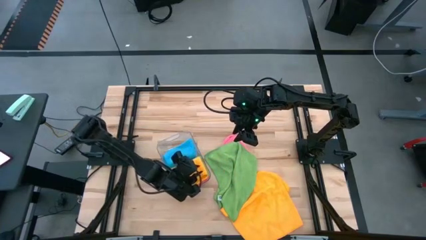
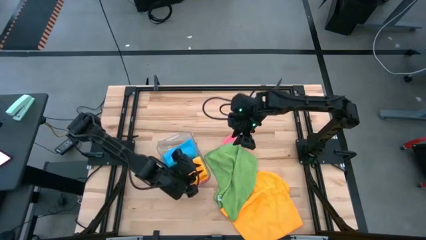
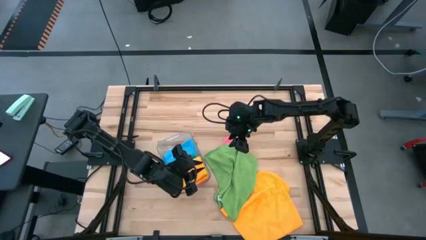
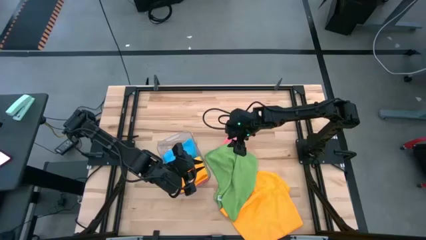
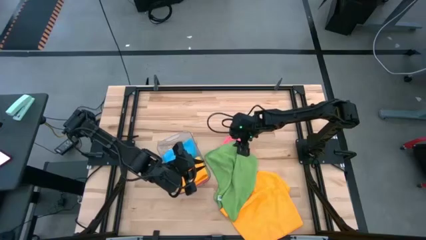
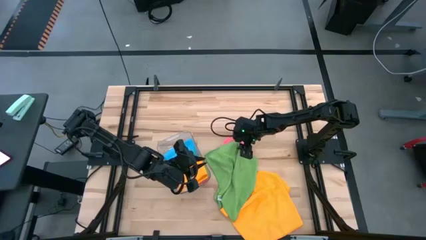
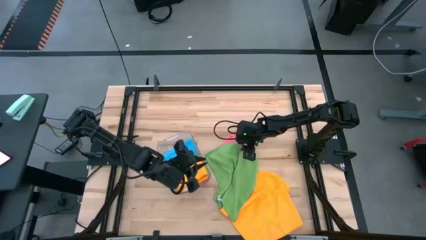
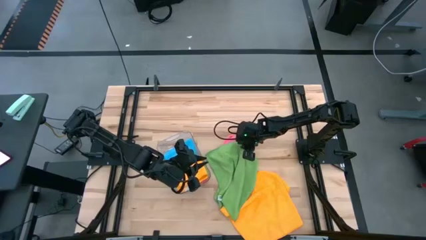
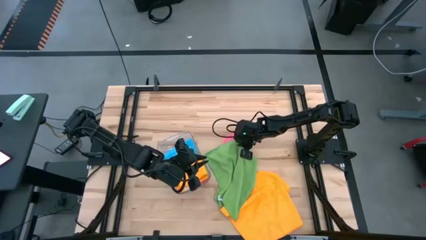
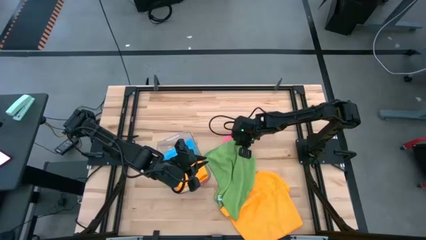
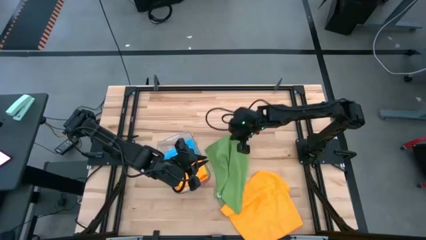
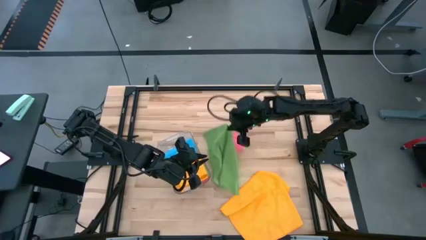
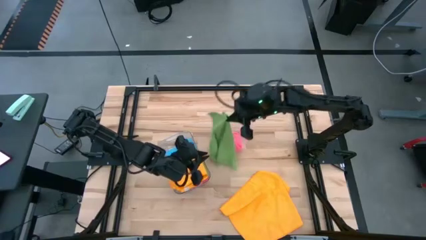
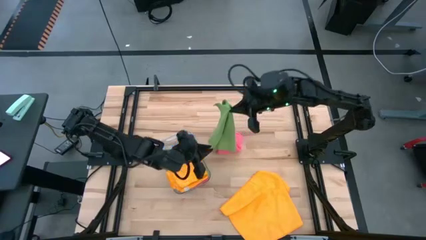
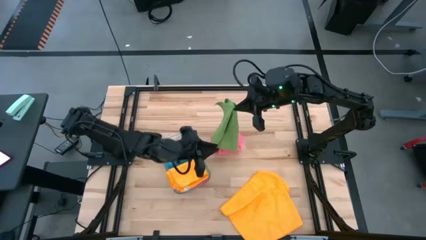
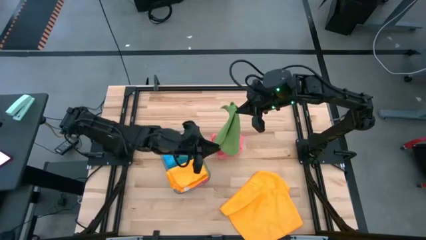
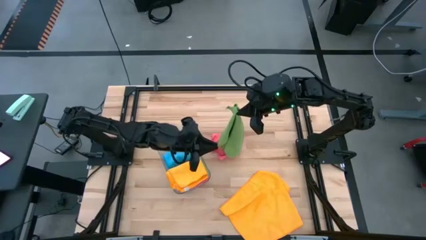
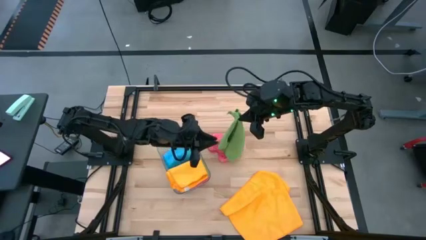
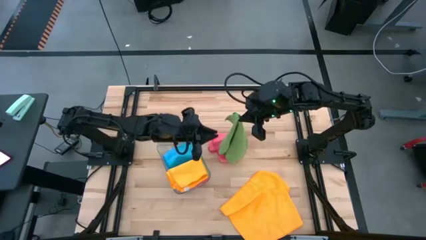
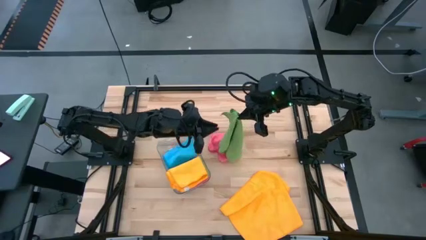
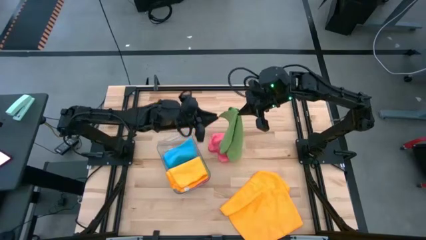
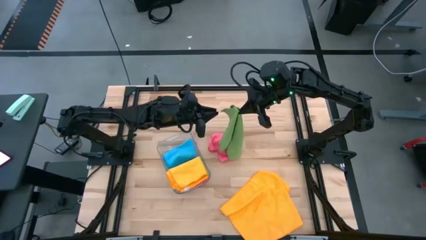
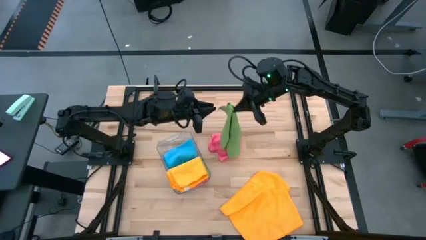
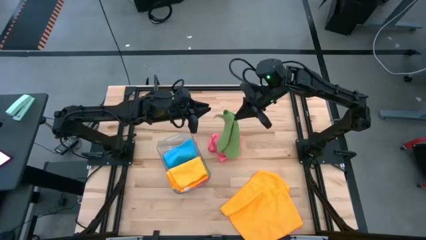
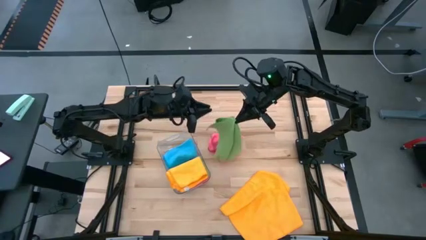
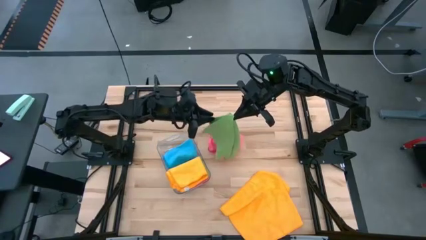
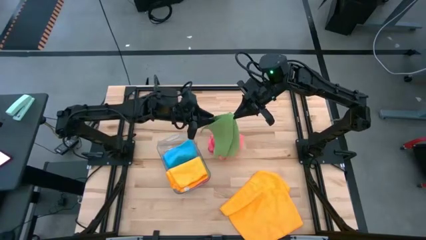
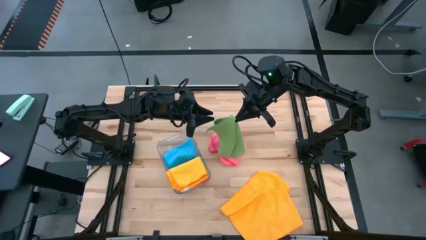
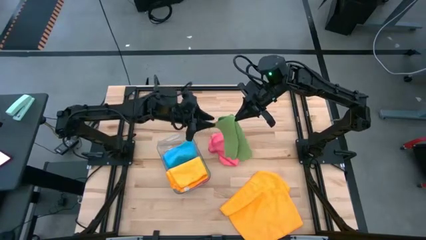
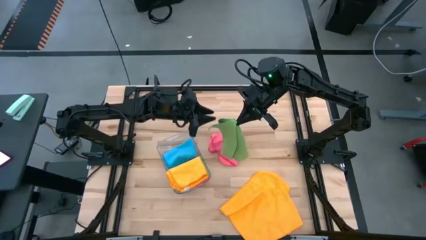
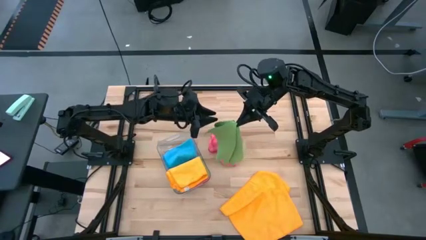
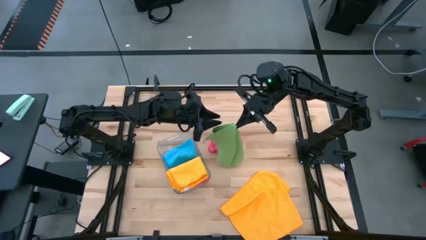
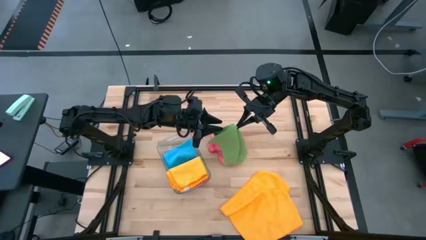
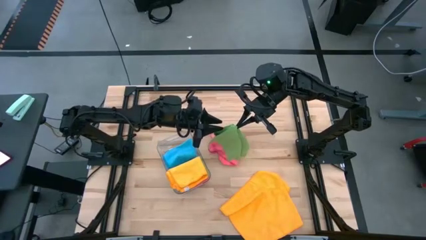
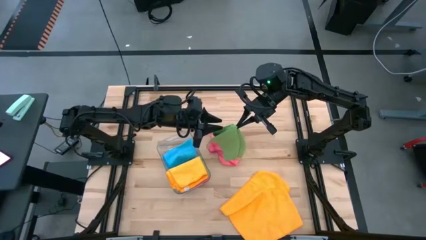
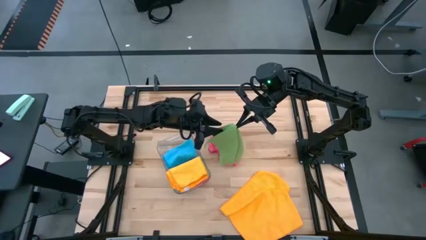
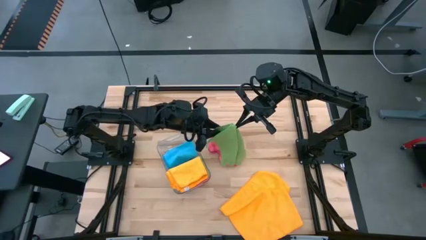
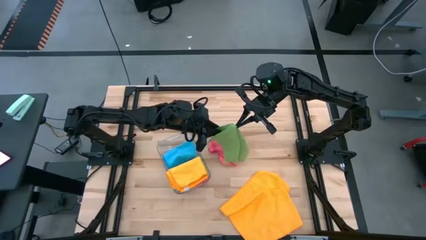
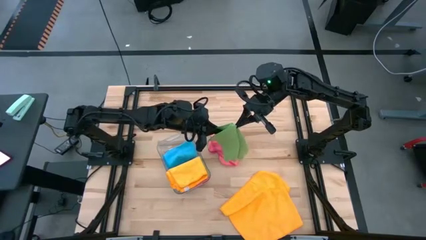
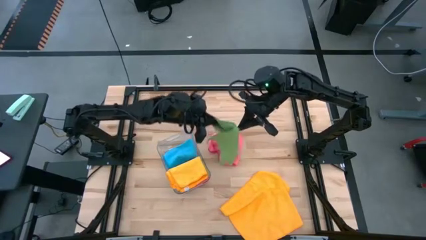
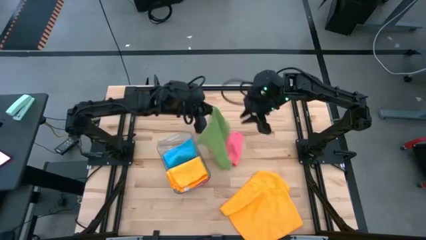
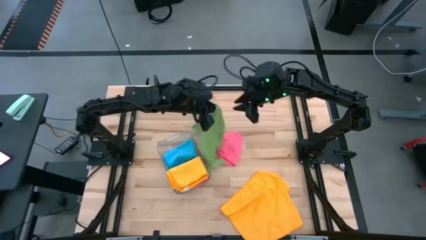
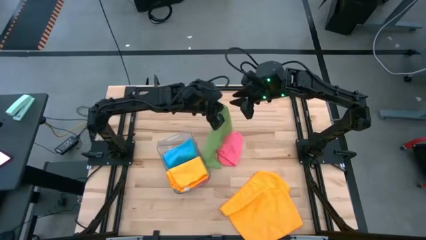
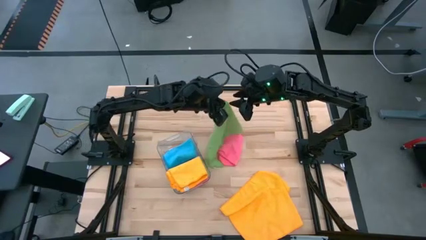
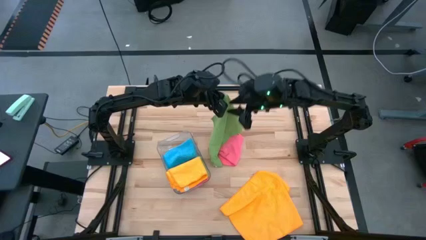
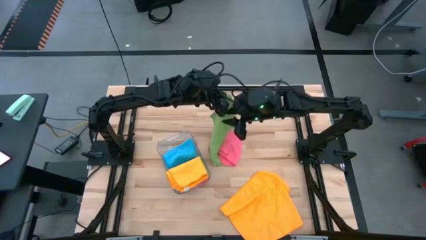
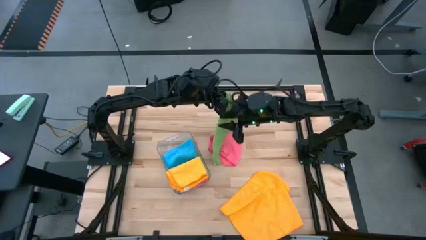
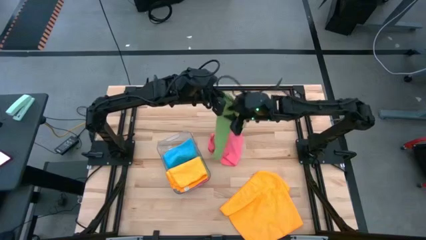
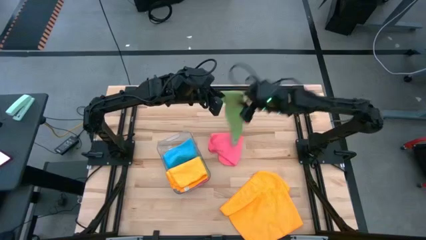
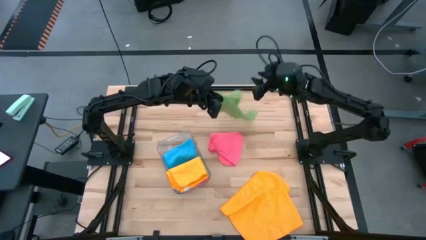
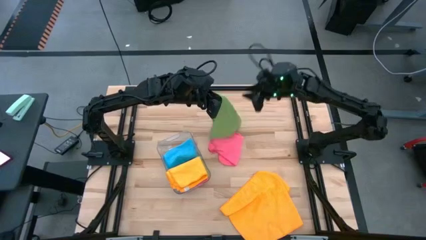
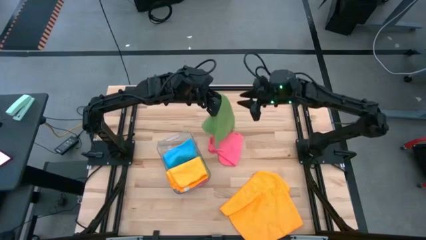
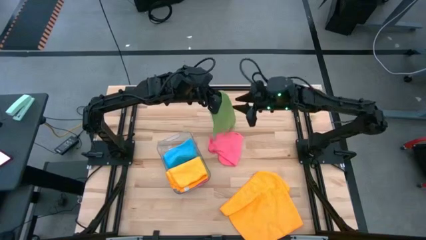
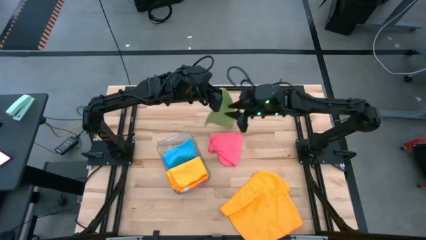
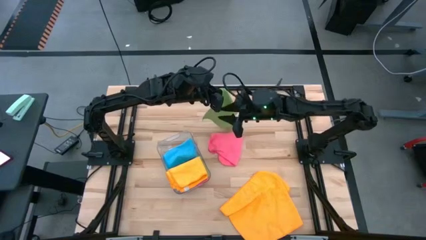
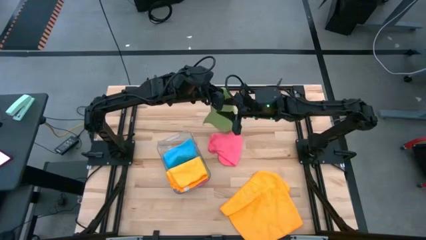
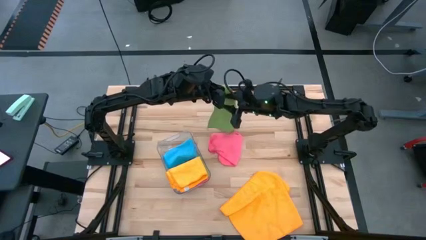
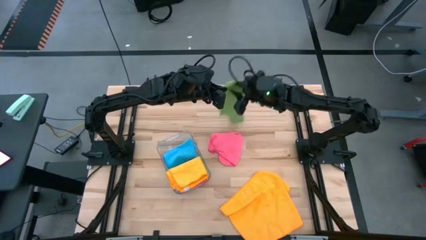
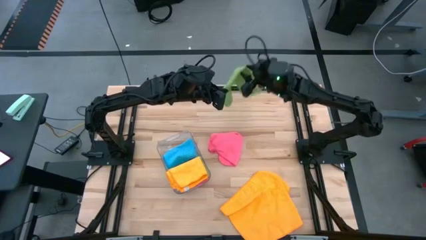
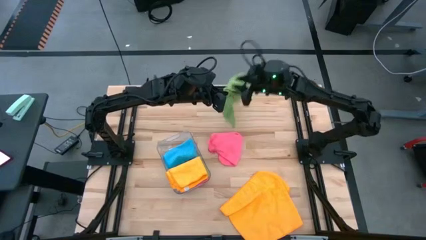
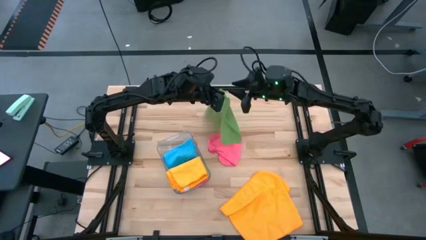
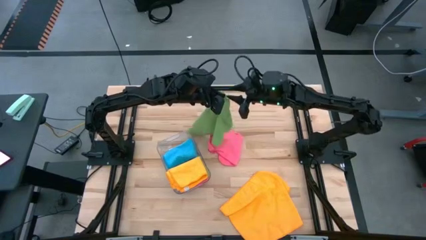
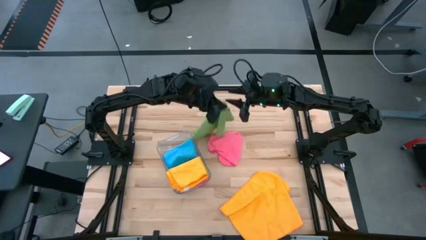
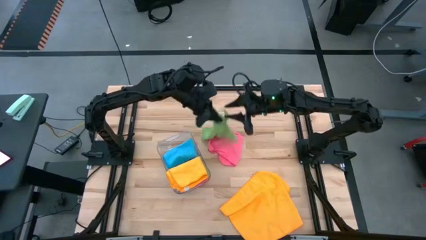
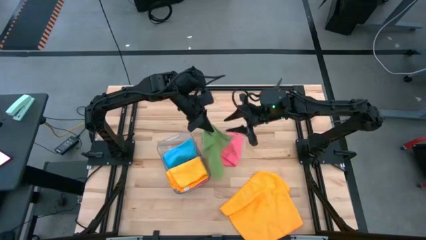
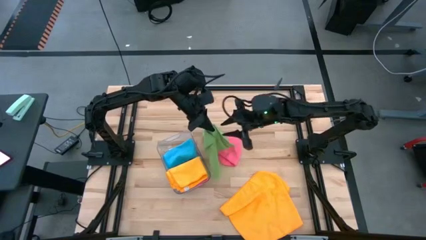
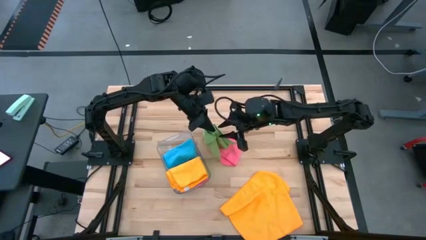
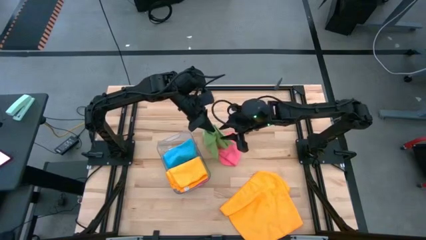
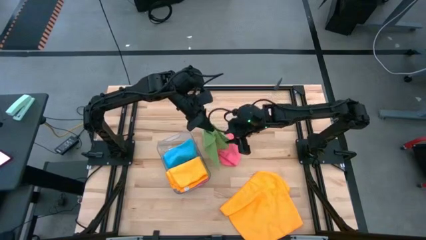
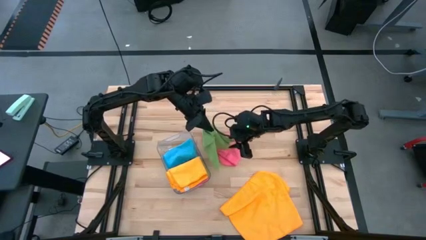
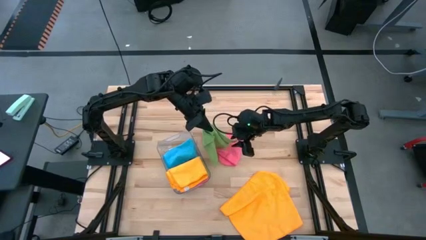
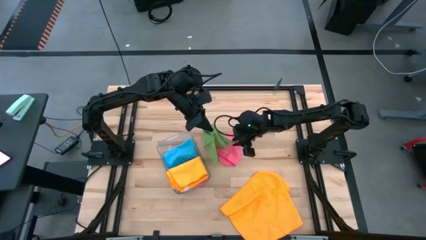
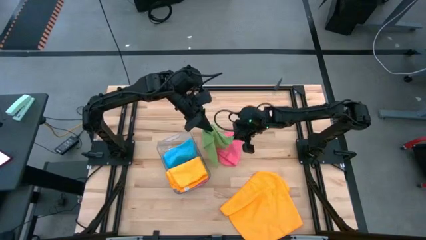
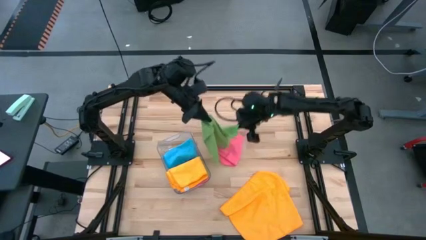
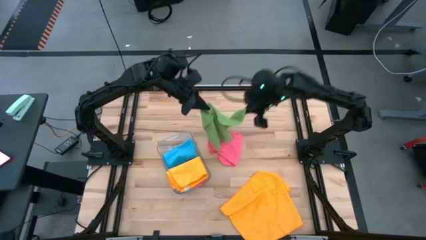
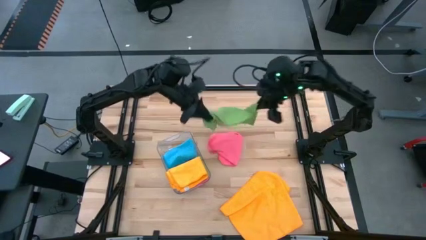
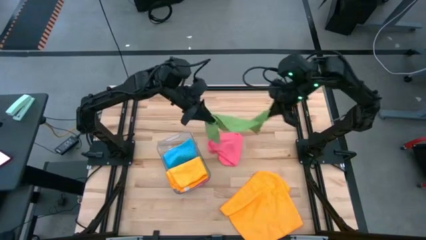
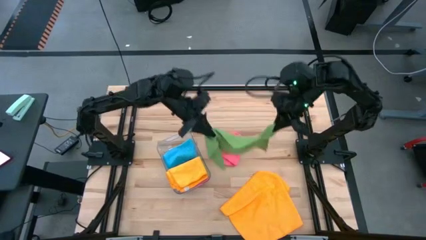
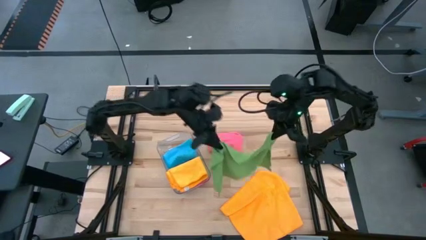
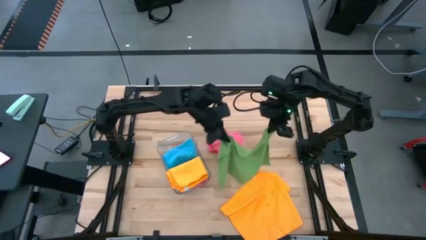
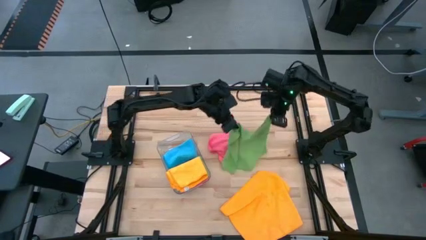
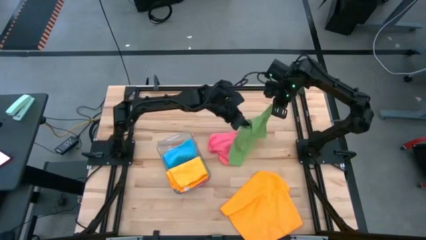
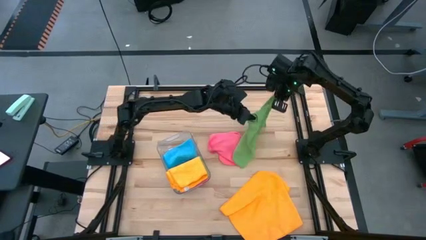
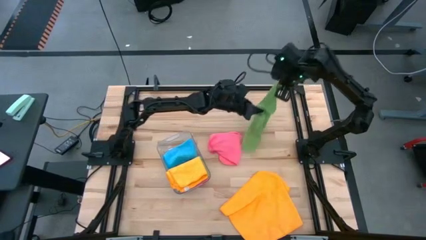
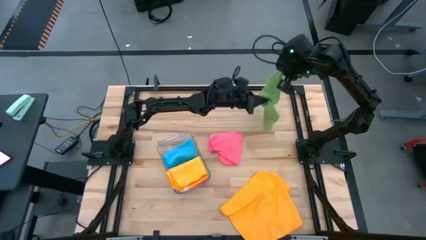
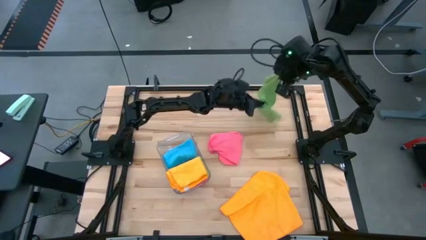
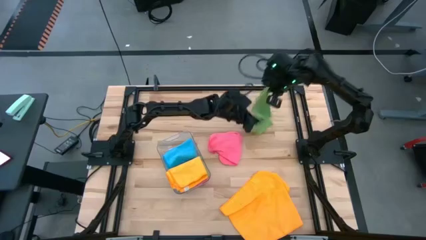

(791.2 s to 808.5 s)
Task: Fold microfiber towels
Fold the green towel
